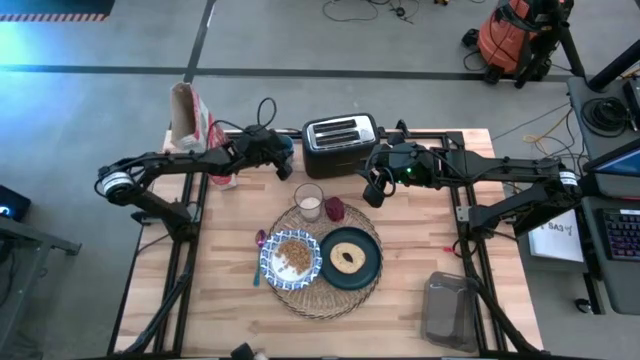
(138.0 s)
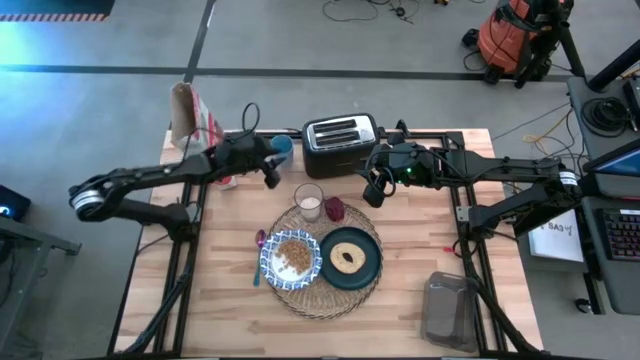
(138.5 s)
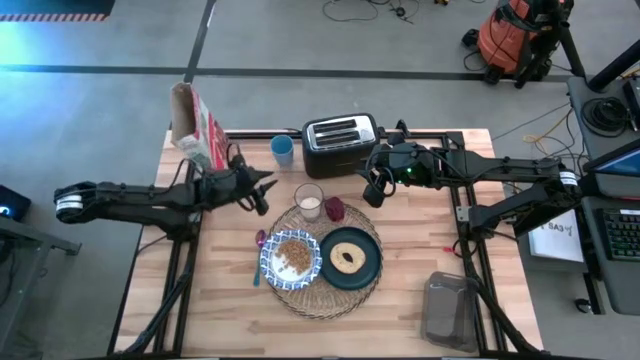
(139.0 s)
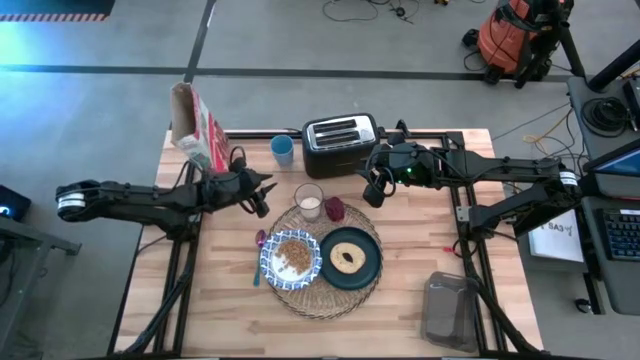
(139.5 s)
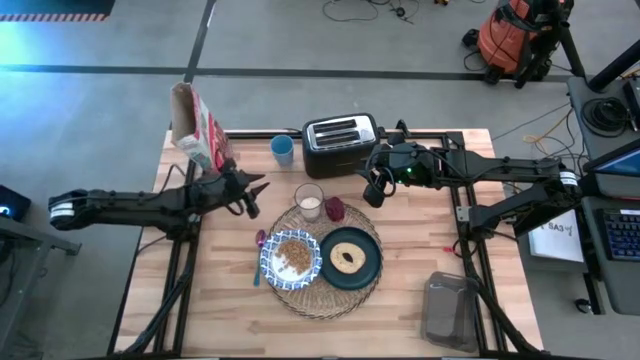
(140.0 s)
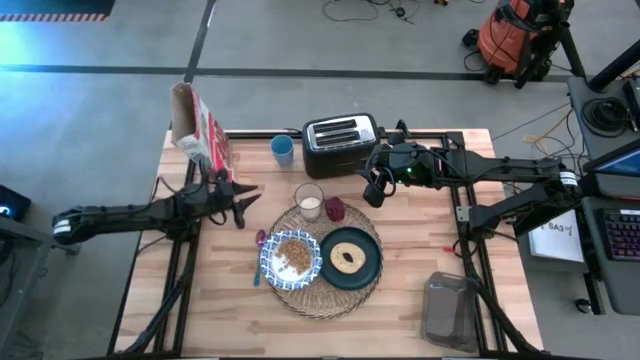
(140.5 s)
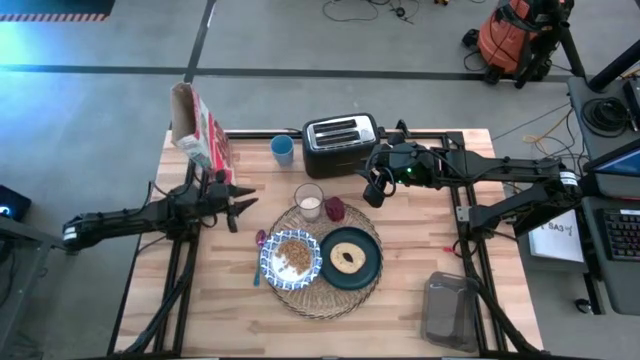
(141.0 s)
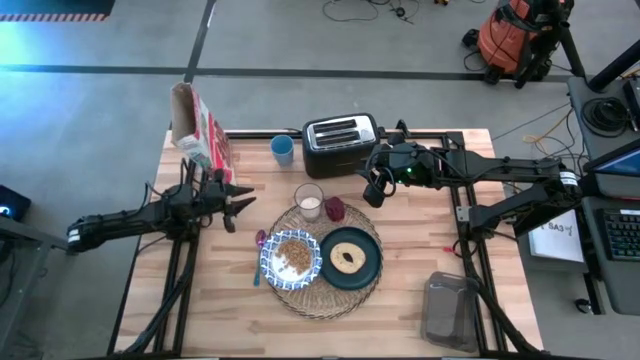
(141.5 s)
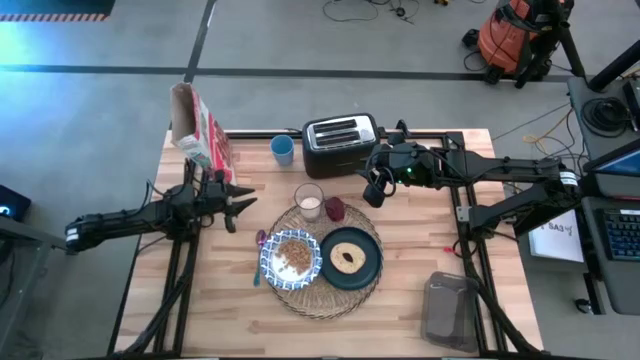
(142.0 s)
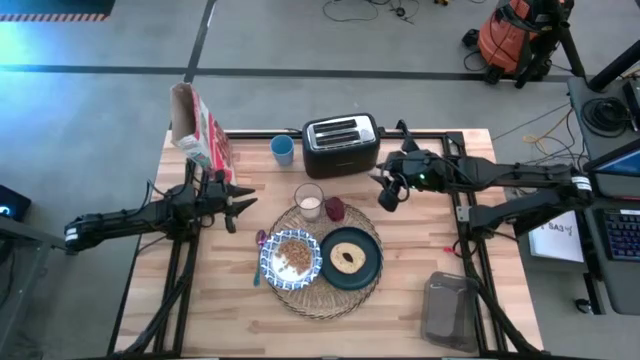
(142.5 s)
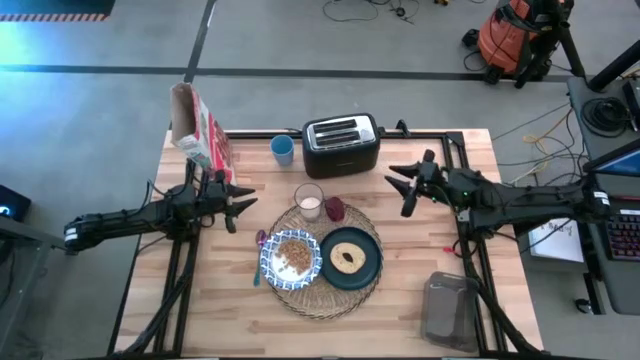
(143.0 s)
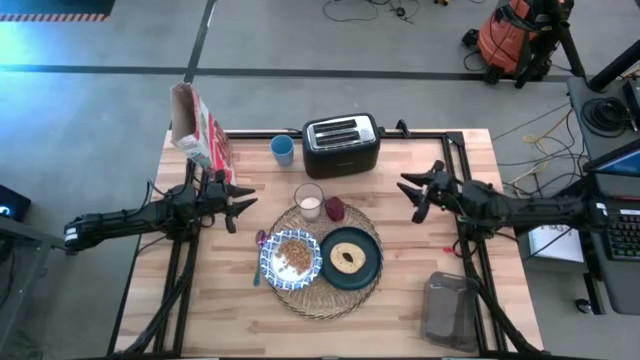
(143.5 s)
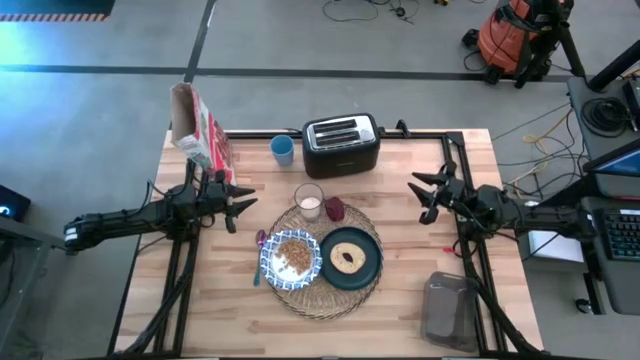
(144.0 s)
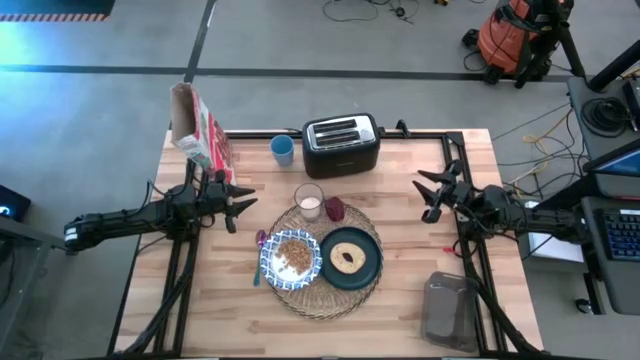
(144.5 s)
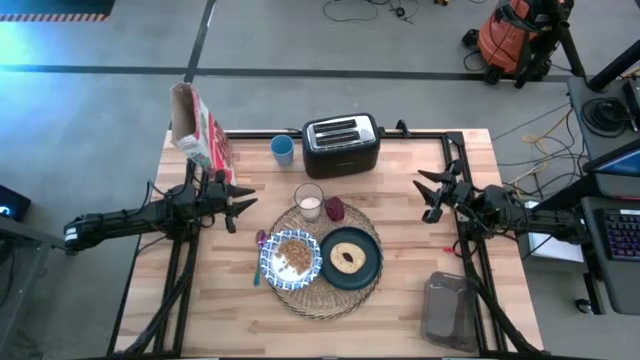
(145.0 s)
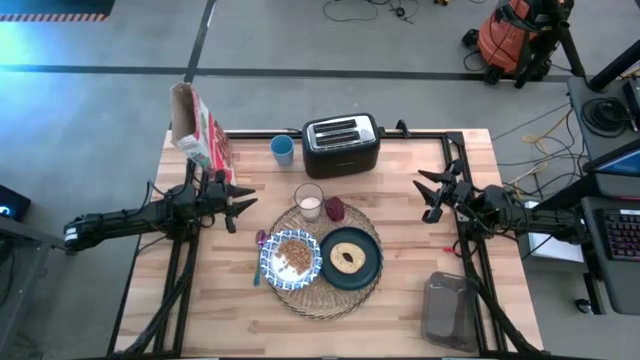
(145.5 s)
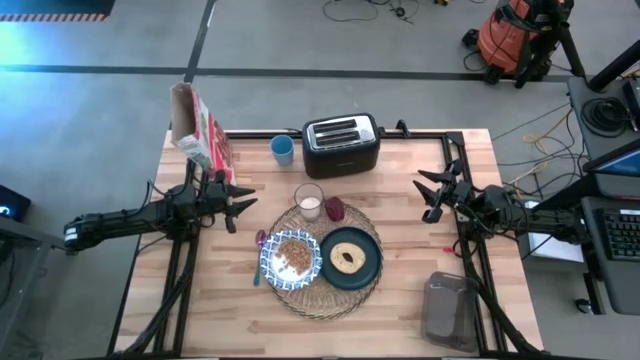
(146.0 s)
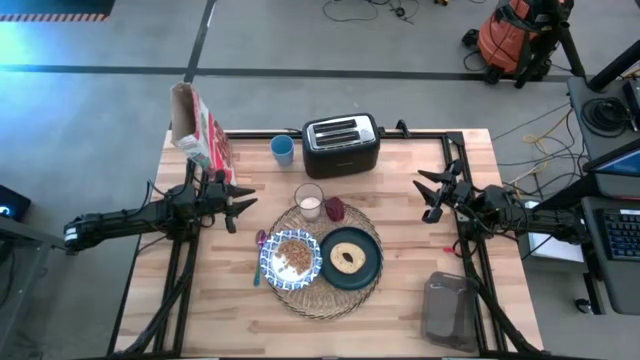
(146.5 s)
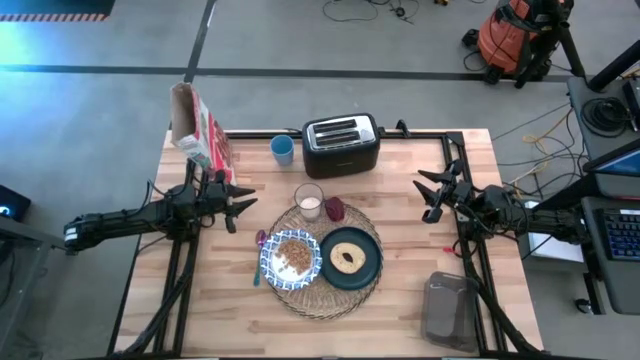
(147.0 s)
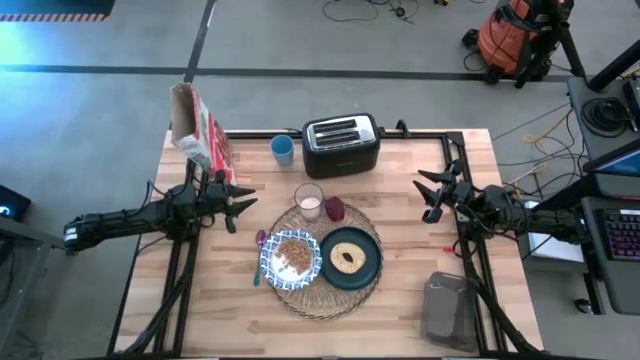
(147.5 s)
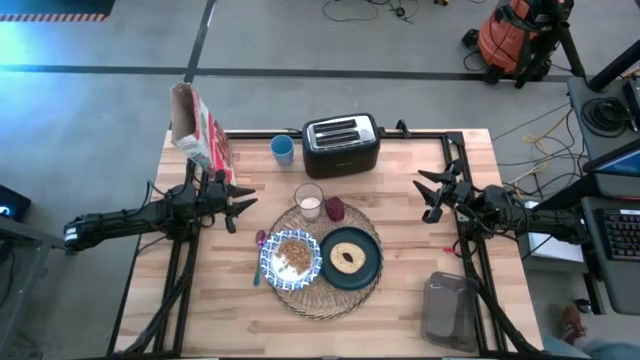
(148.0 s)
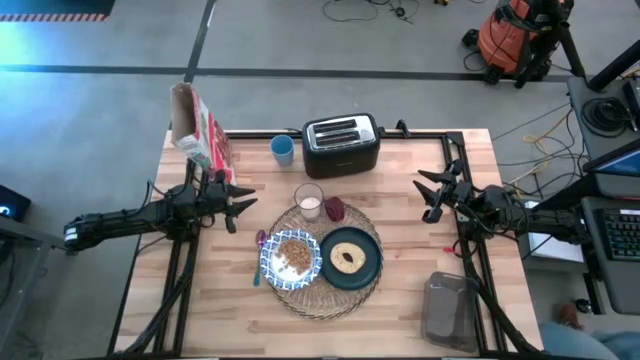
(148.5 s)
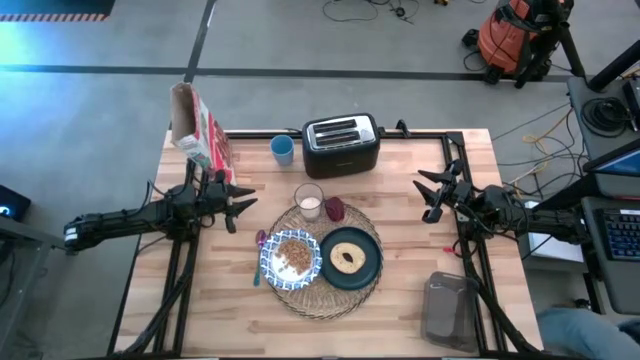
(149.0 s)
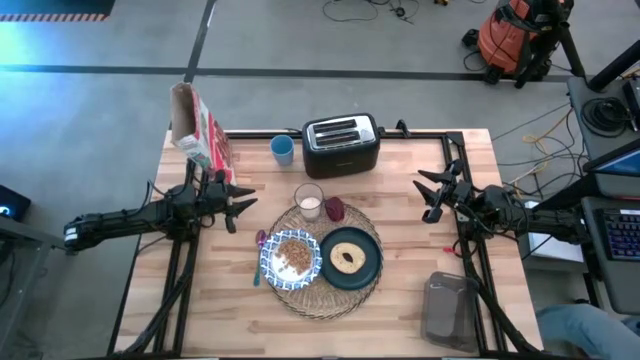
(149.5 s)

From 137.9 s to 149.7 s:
Task: Arrange a breakfast setting
Return to Home Position

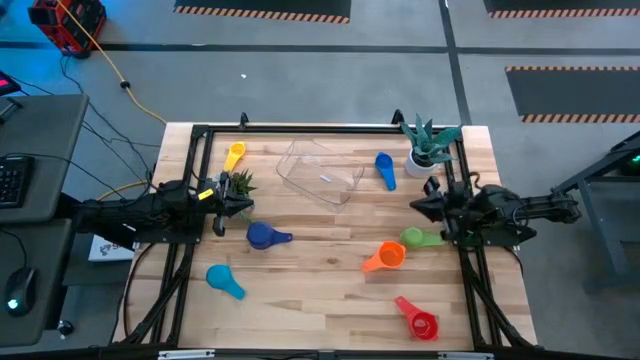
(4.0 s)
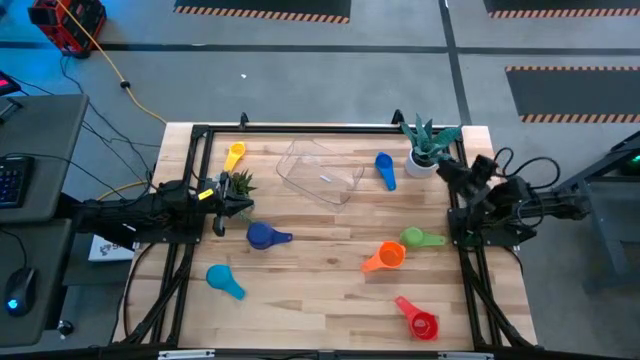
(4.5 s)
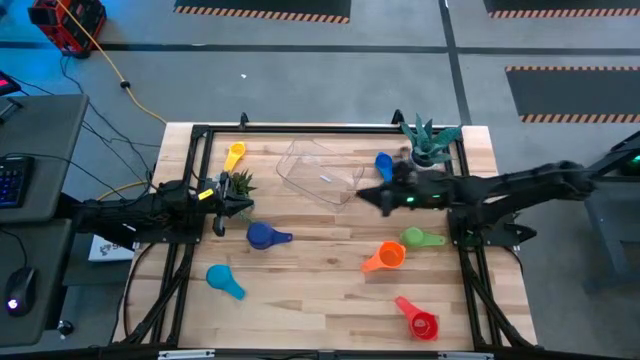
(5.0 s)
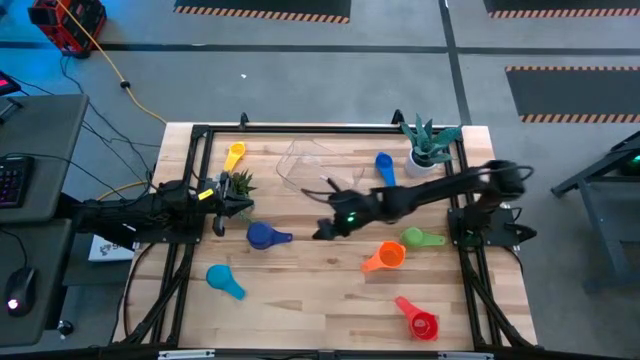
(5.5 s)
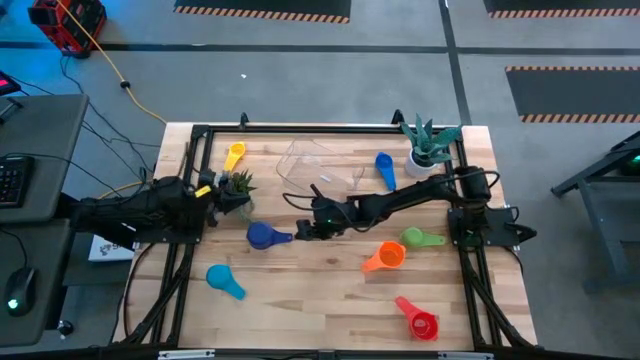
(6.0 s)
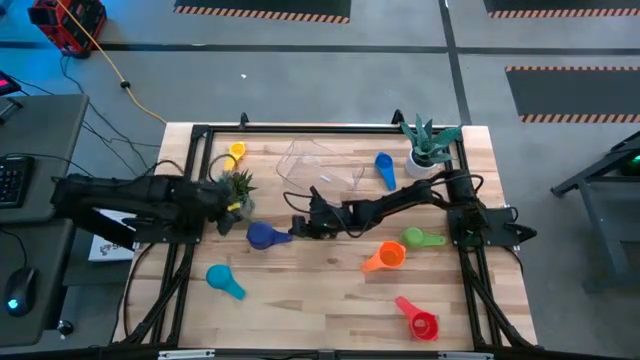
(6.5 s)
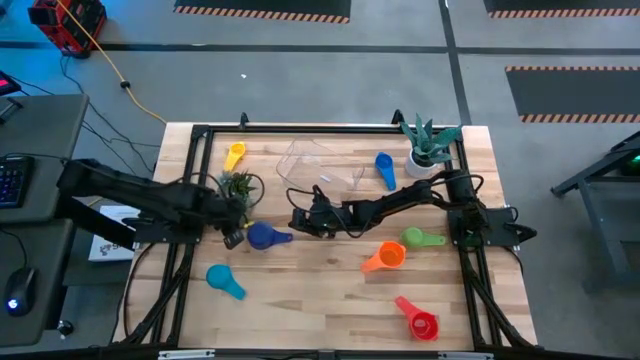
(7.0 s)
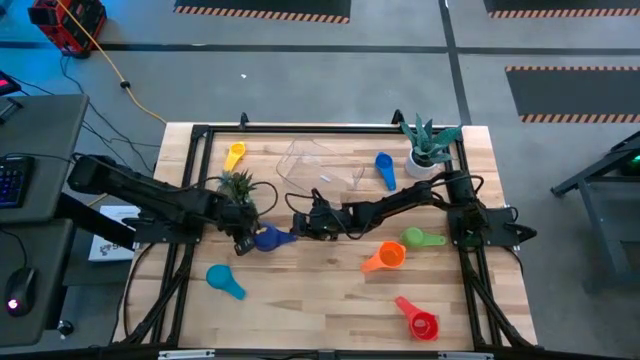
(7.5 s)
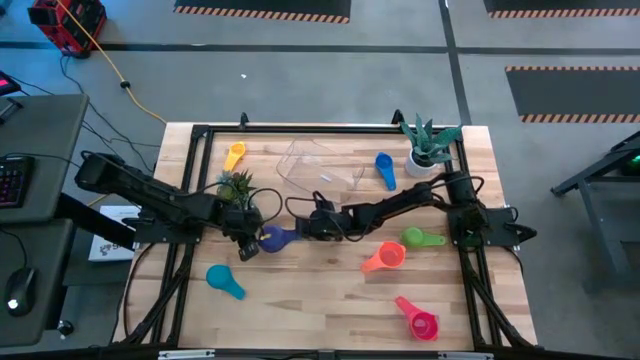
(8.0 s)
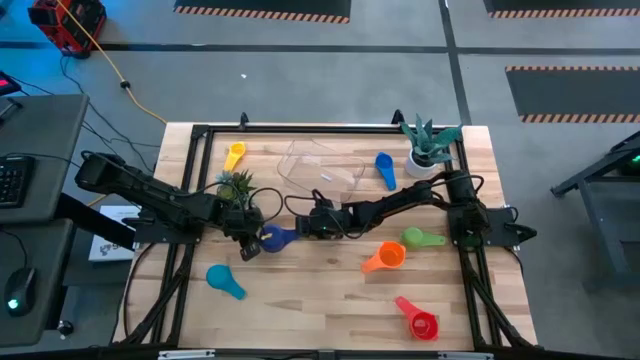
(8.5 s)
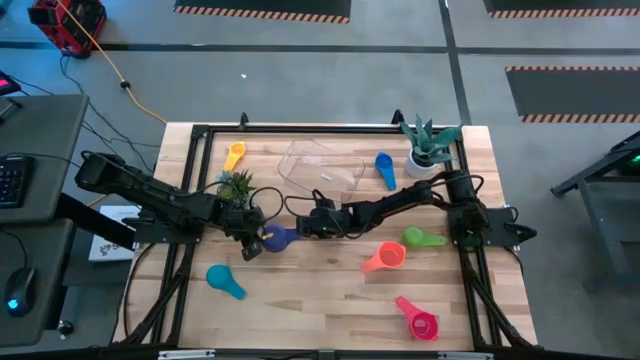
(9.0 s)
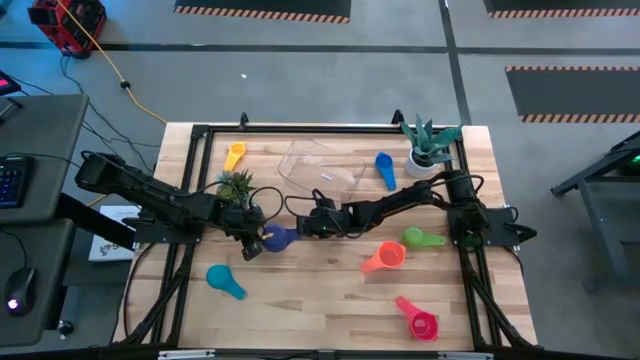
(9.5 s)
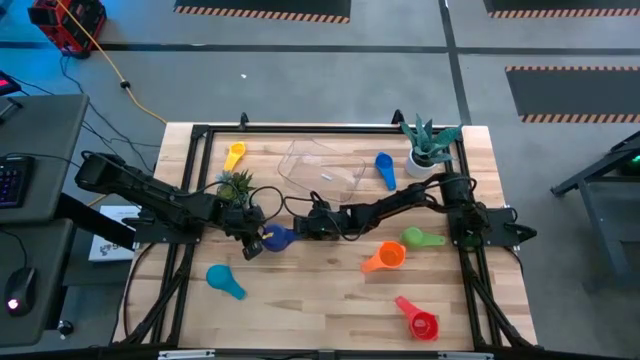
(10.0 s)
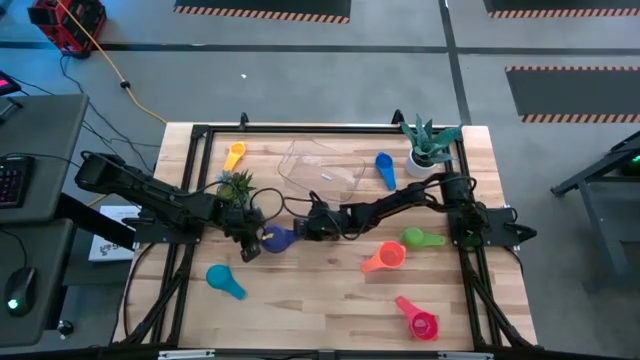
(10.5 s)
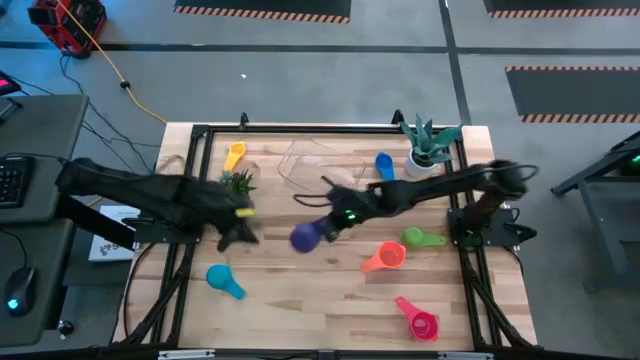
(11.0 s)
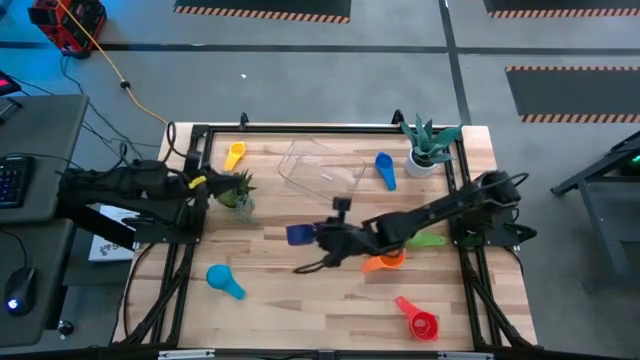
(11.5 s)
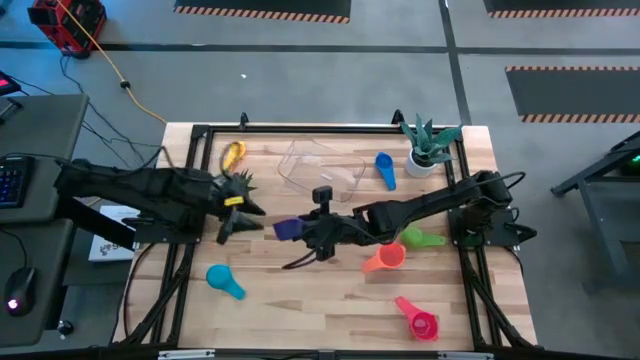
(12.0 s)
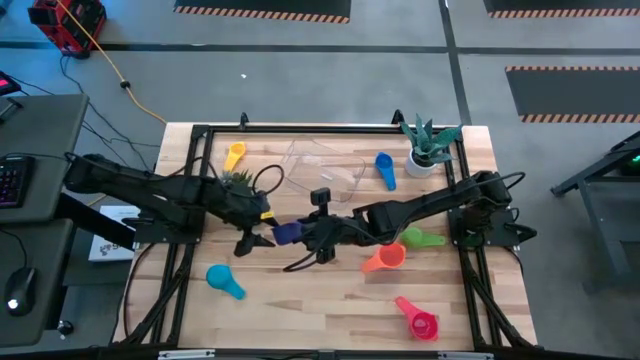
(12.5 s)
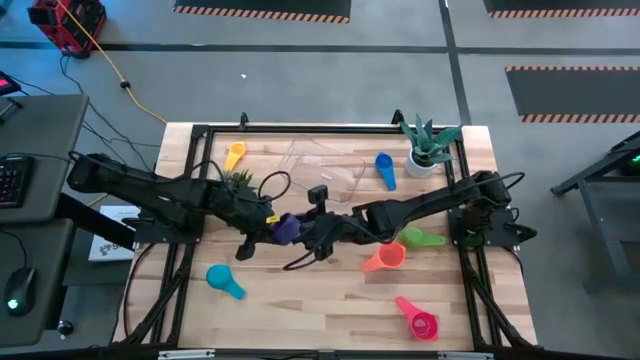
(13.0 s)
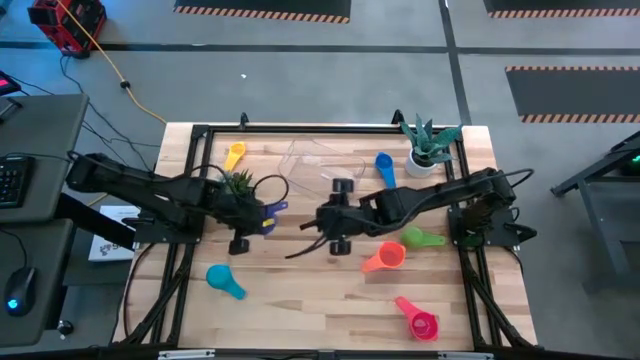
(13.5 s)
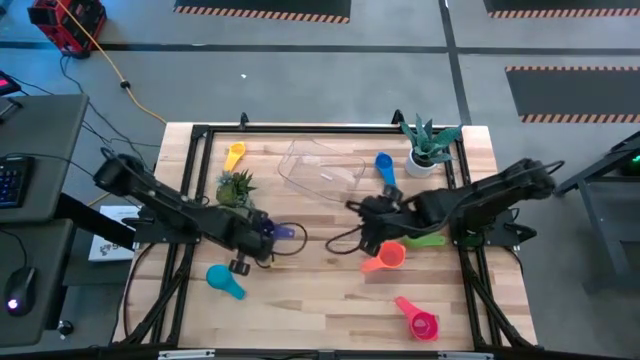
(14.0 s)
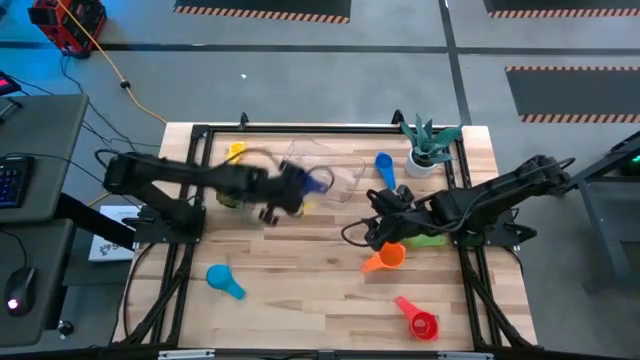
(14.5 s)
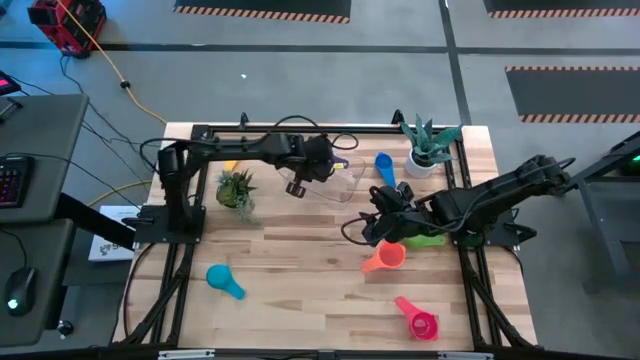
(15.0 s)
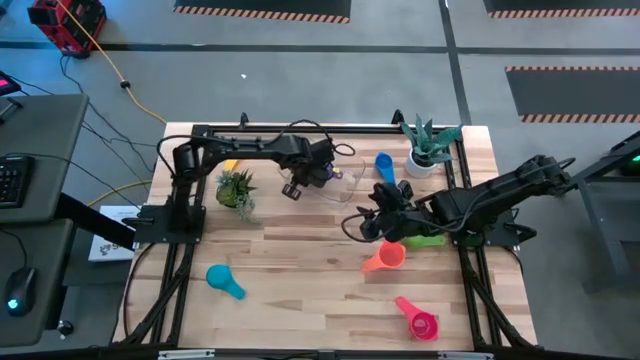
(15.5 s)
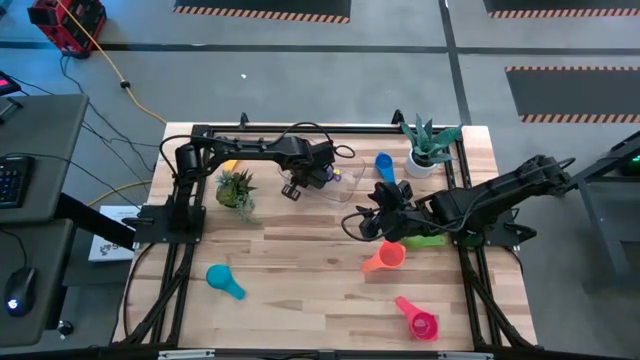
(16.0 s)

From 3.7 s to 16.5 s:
Task: Nest measuring cups in basket
Put the dark blue measuring cup into the transparent bin
